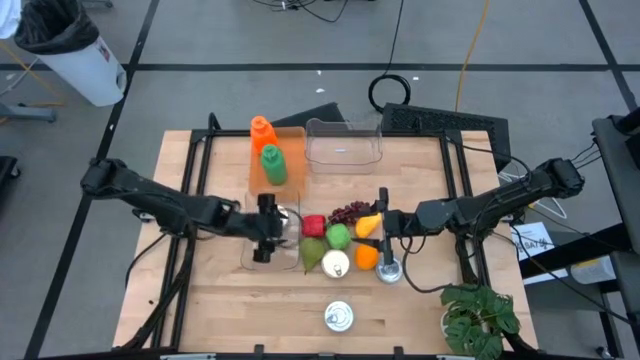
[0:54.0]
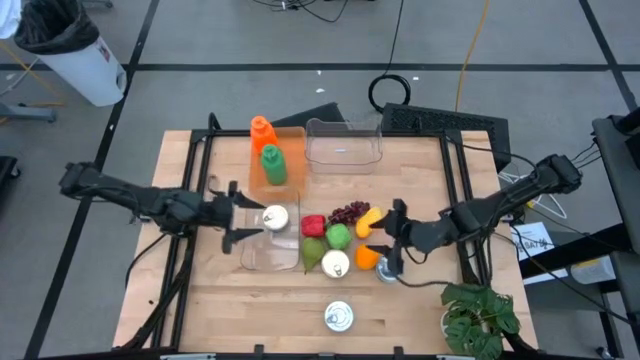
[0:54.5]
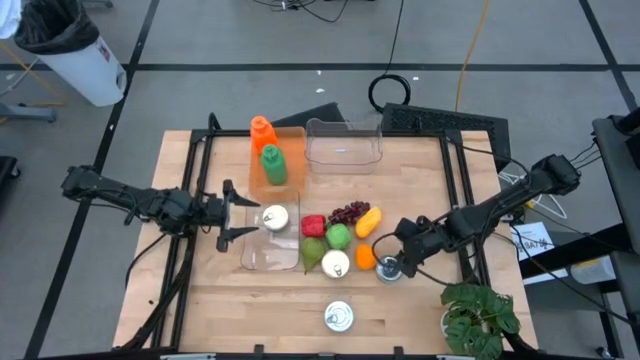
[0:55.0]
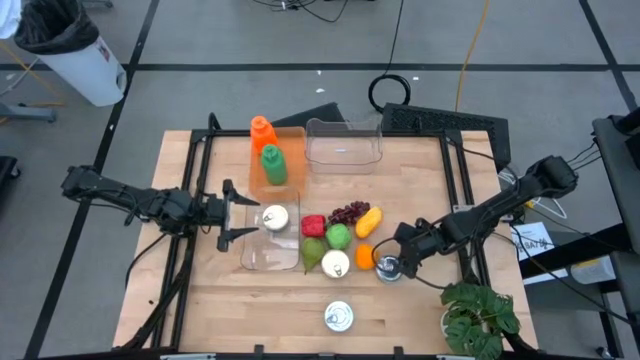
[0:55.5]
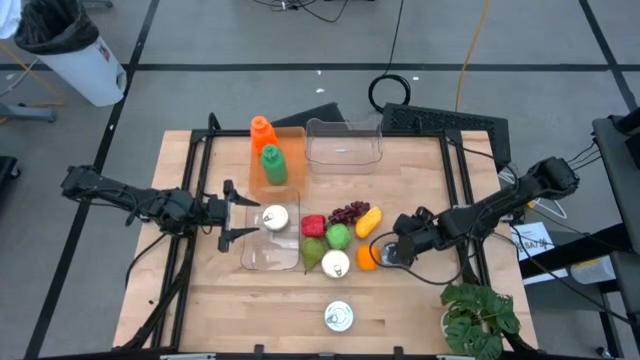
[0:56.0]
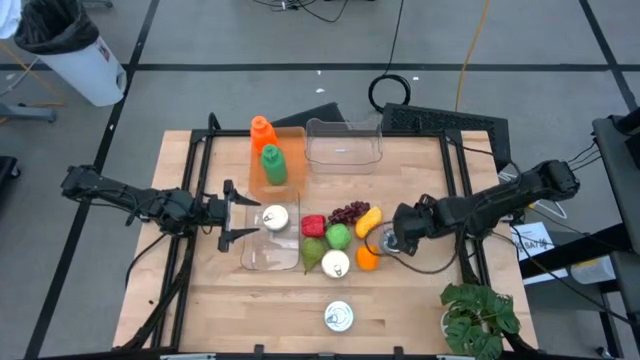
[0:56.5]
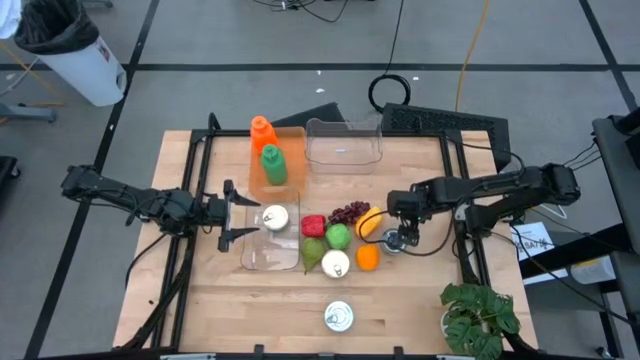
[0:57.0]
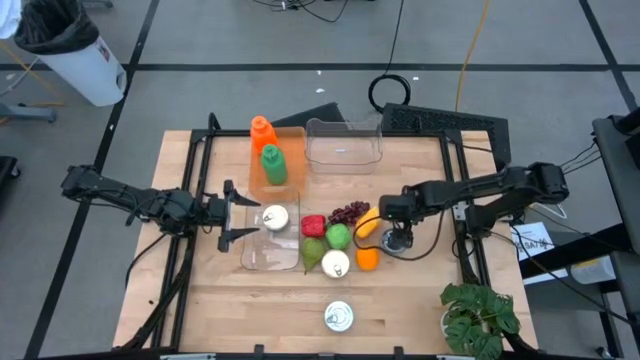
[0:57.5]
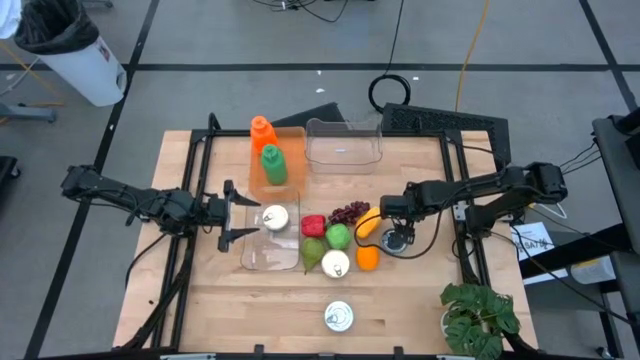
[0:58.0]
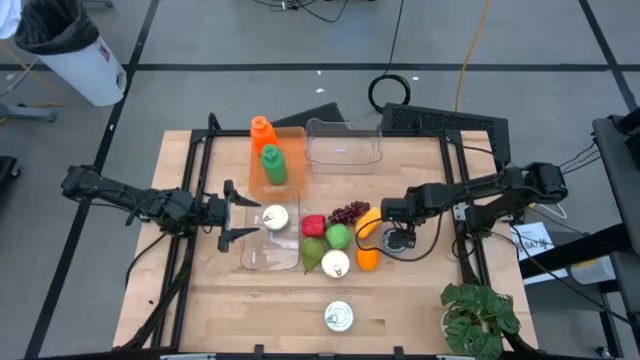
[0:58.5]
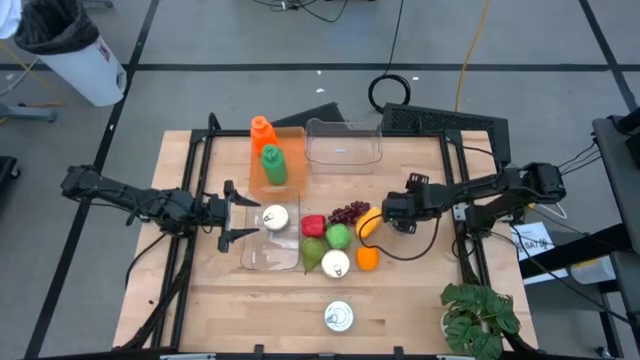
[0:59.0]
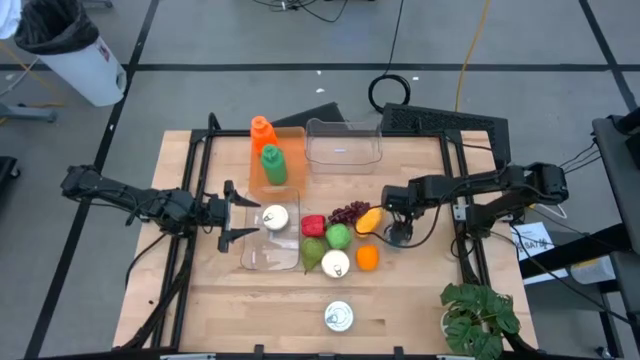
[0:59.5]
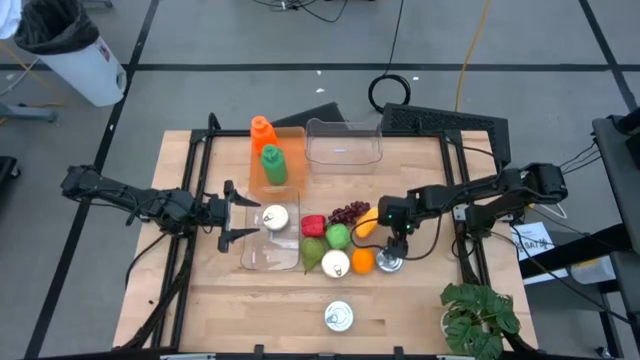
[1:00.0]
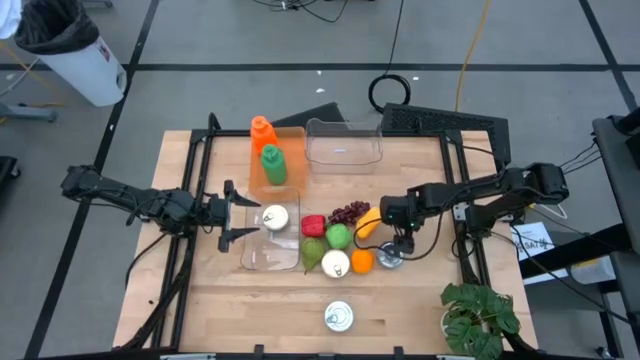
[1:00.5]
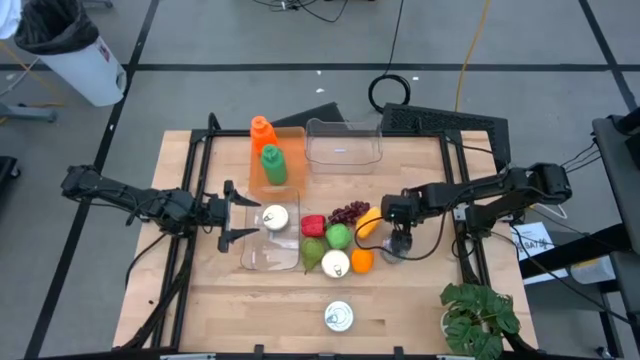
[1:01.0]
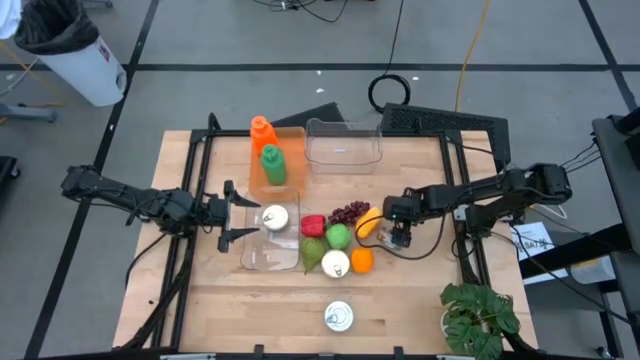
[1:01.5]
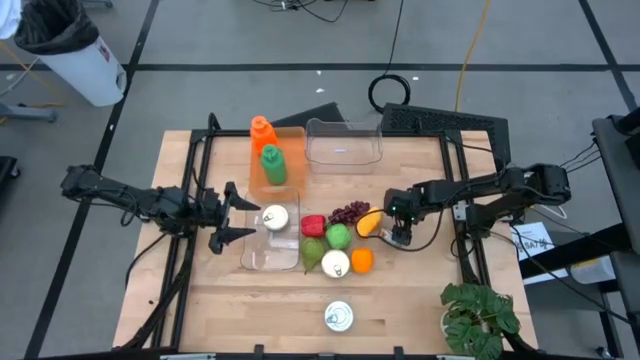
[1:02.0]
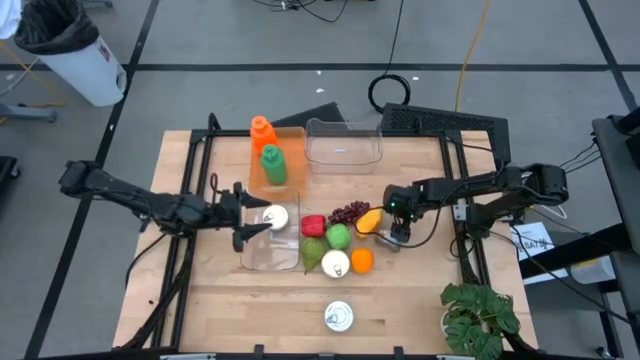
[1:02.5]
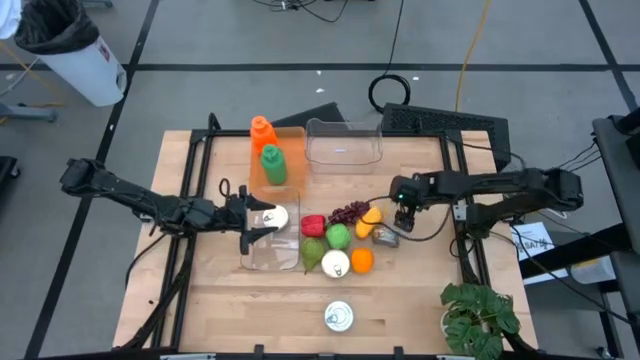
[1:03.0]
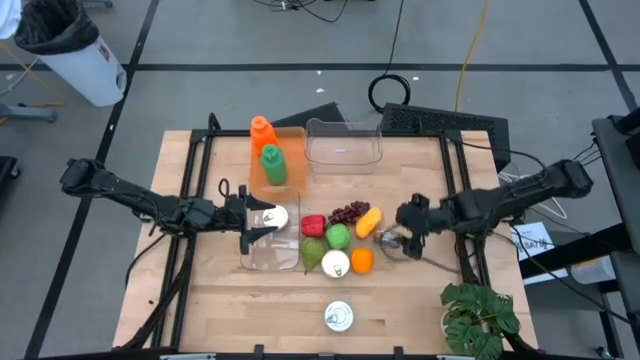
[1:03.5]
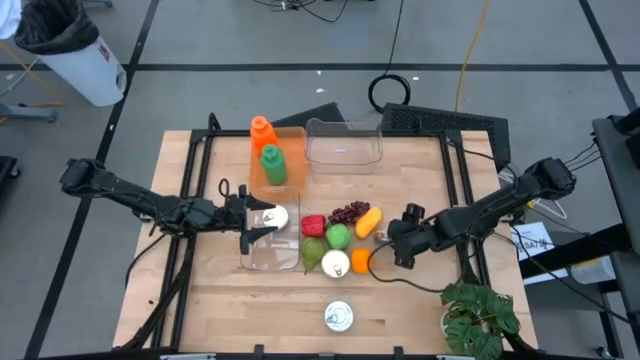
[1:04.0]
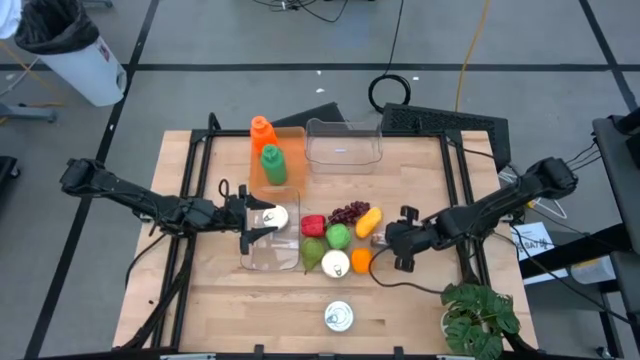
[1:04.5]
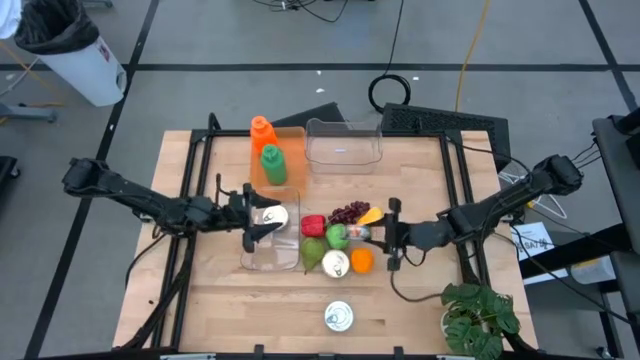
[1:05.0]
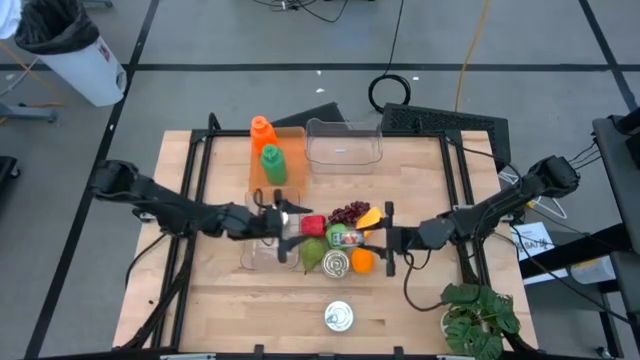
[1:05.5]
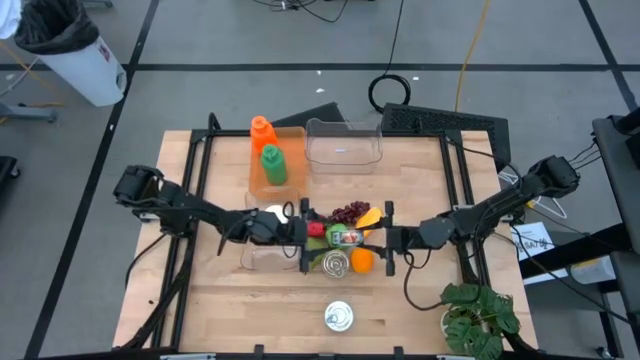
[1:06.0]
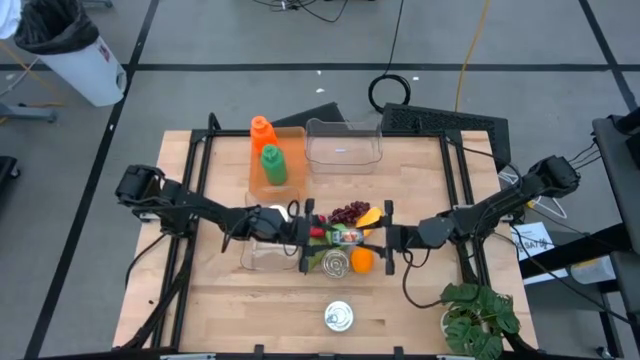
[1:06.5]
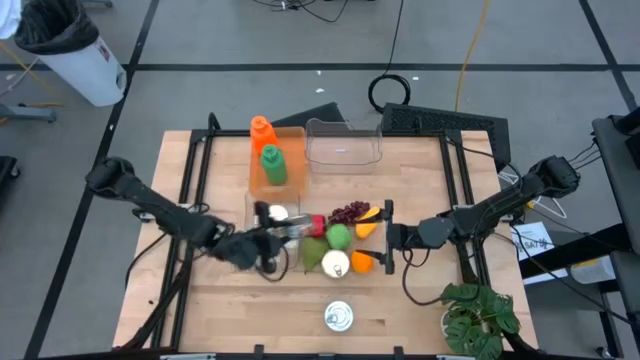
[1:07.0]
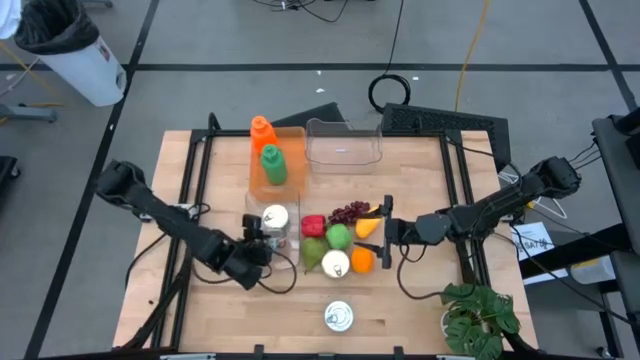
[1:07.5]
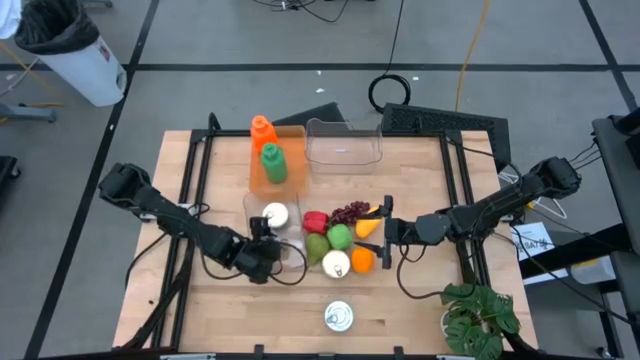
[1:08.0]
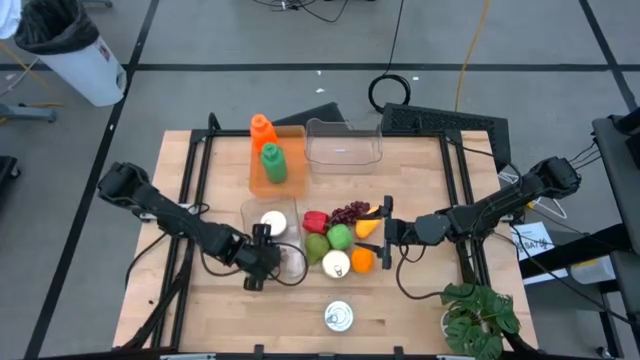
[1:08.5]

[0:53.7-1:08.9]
Task: Pick & Place Food Item
Put the green tuna can into the bottom transparent bin

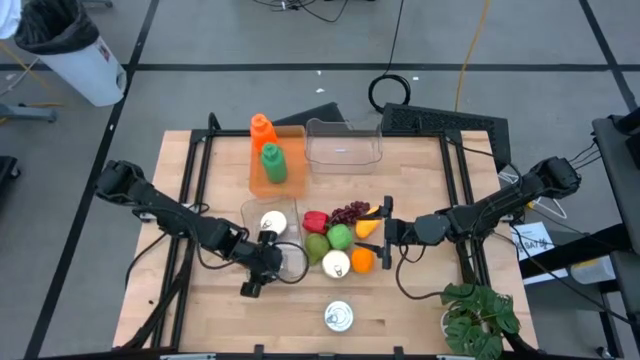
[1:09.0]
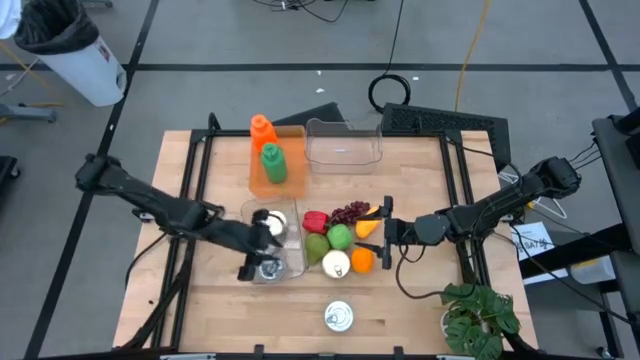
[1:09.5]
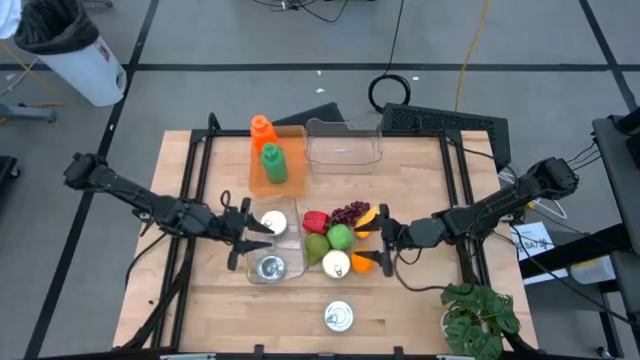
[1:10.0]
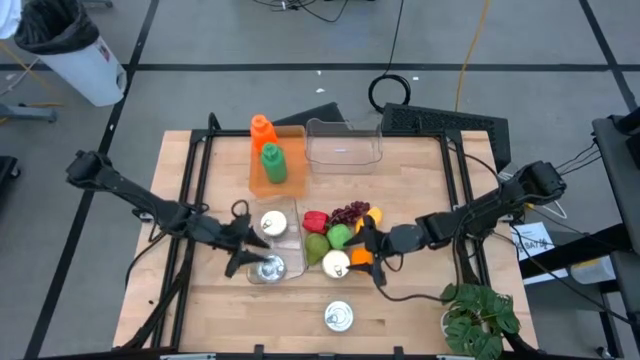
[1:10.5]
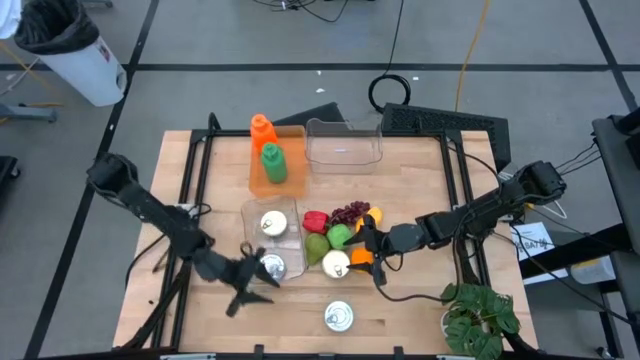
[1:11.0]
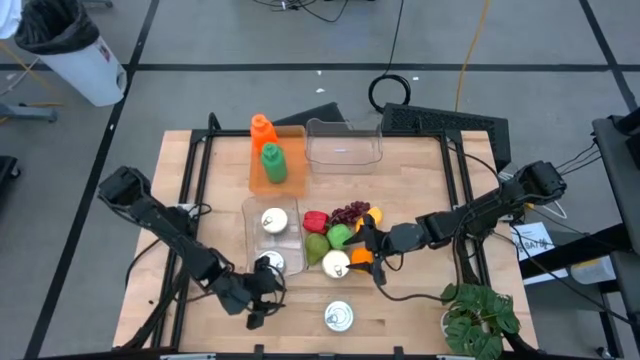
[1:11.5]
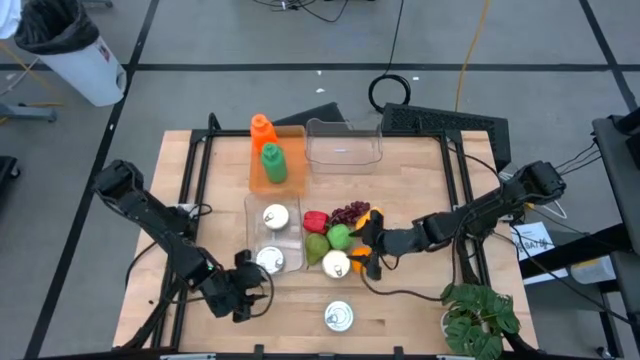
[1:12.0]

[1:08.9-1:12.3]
Adjust the bottom transparent bin

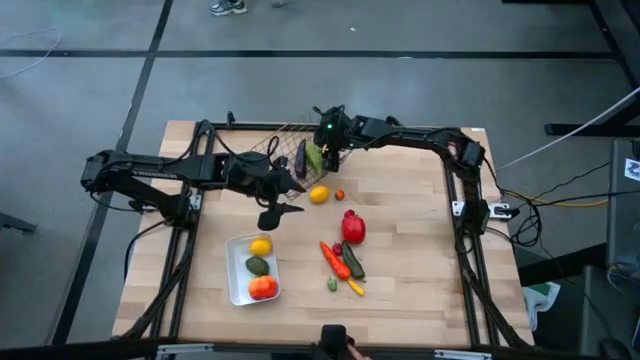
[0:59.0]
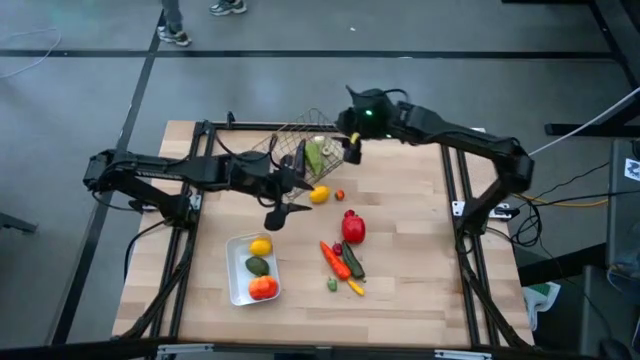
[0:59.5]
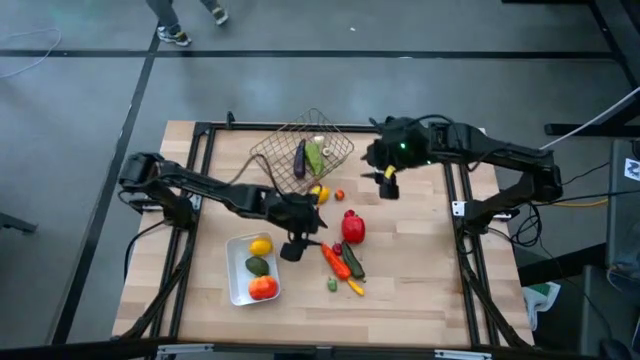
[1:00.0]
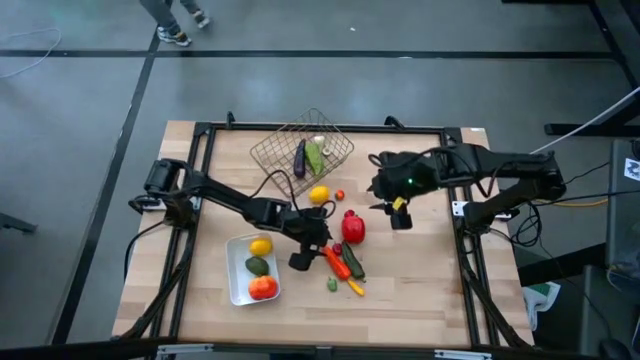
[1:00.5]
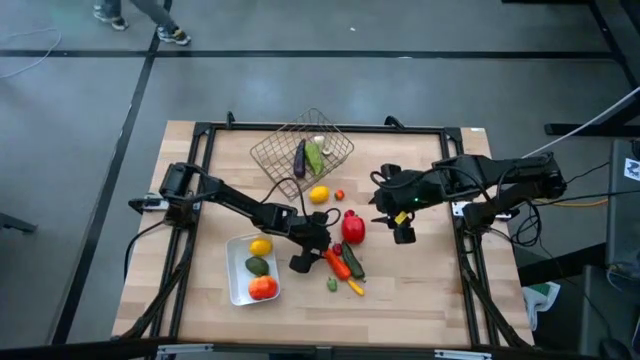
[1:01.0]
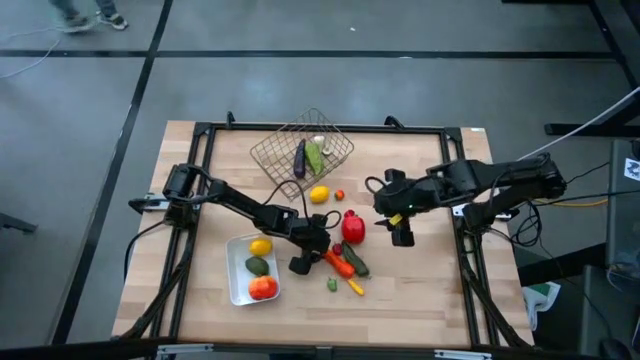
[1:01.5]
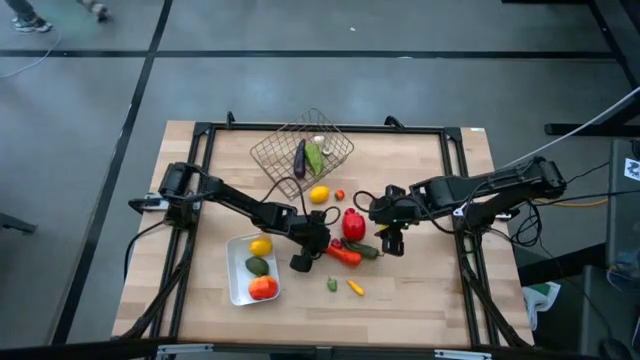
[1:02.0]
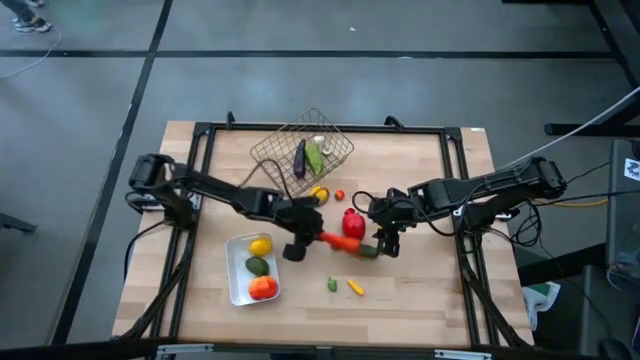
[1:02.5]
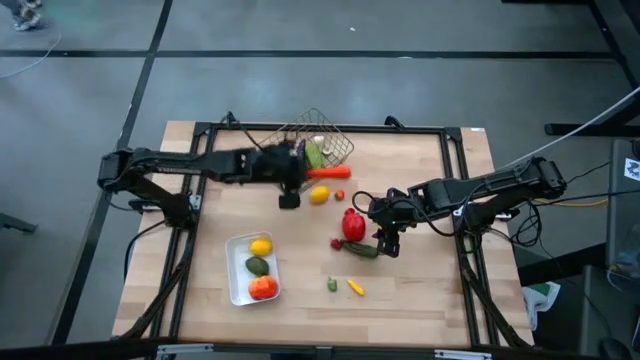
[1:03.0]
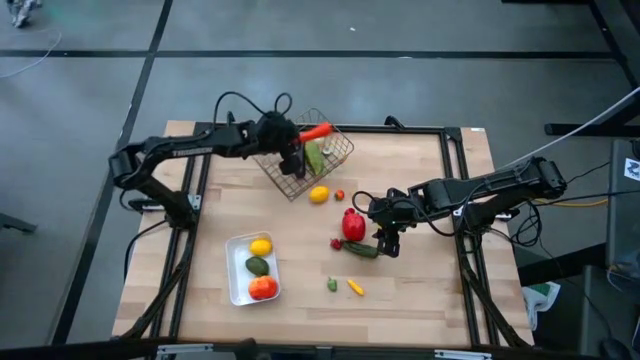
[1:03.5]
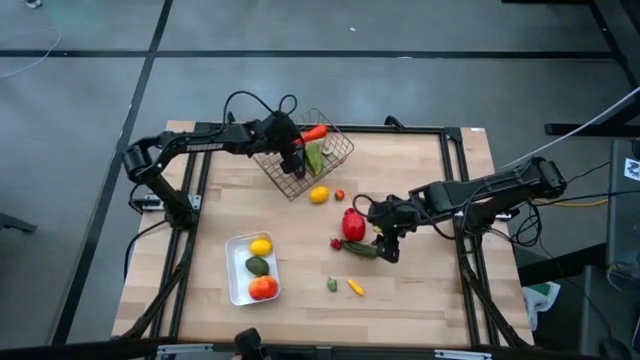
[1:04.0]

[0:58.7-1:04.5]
Task: Sort produce into baskets
Put the orange carrot into the gold wire basket
